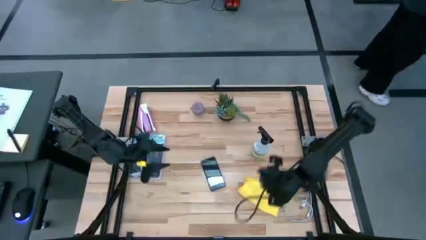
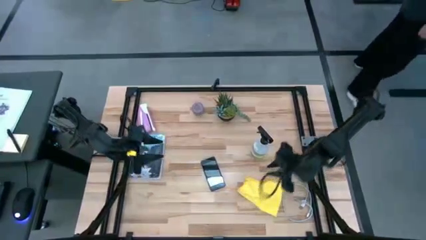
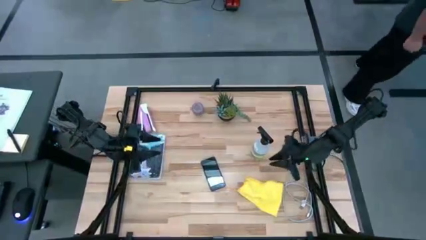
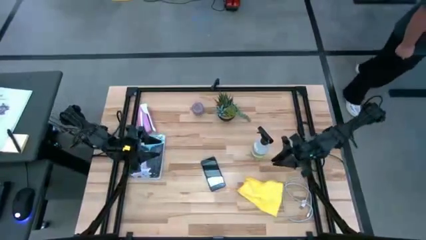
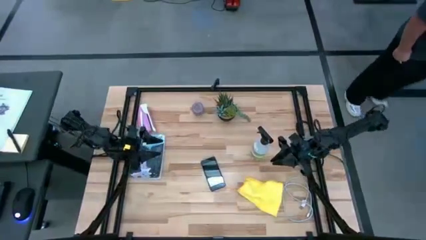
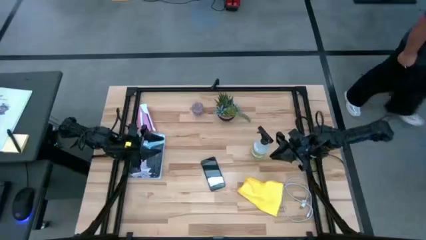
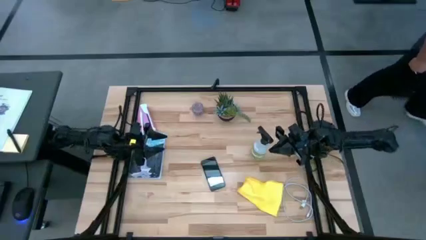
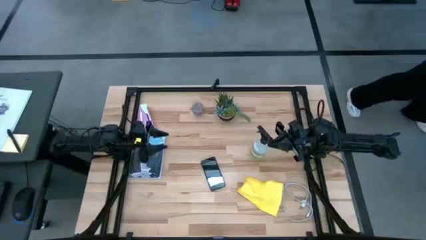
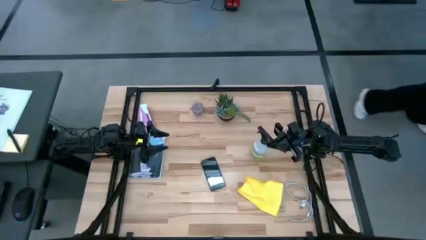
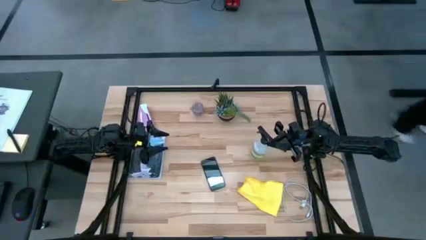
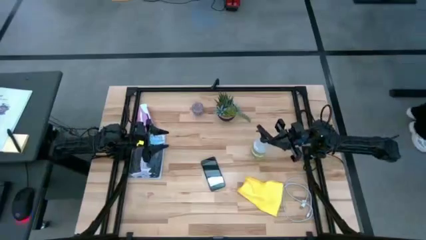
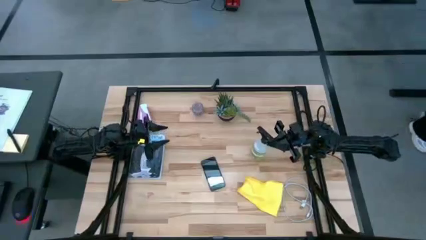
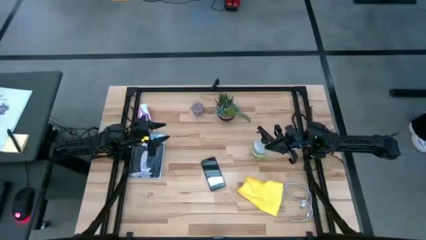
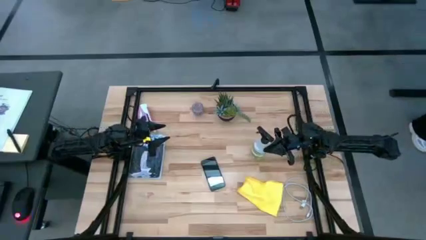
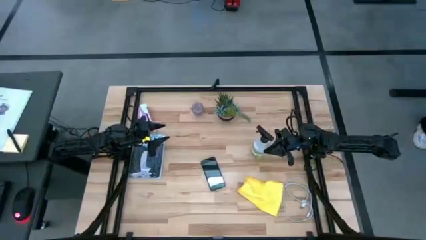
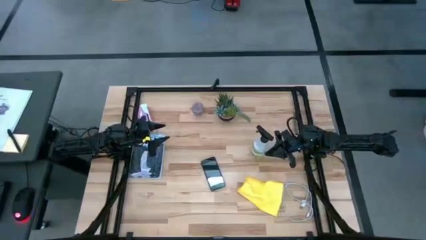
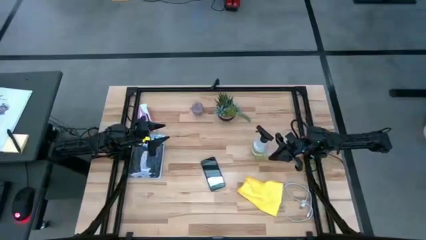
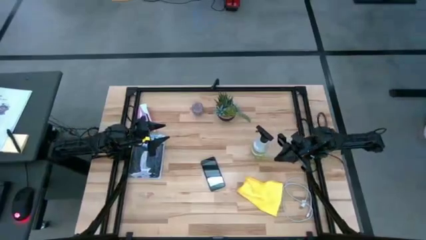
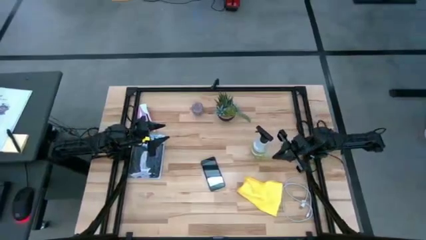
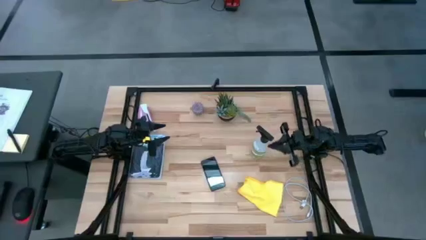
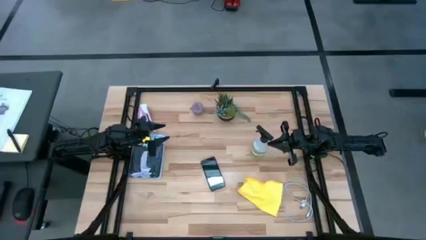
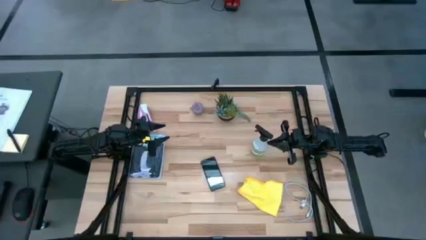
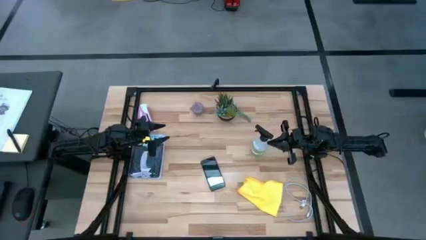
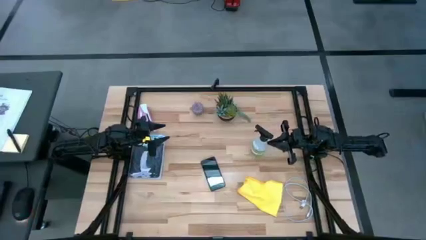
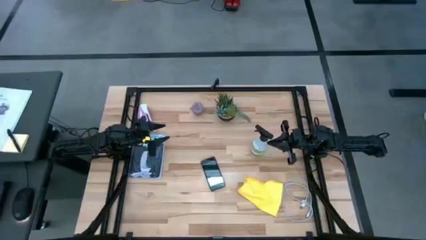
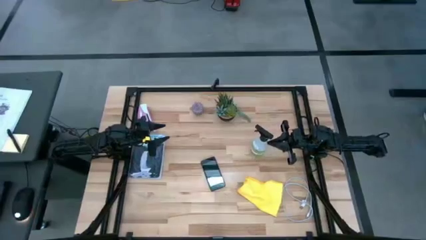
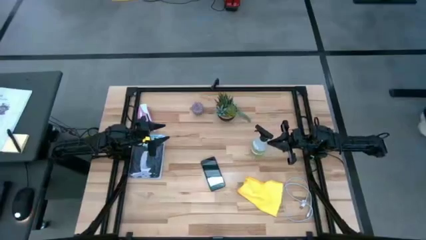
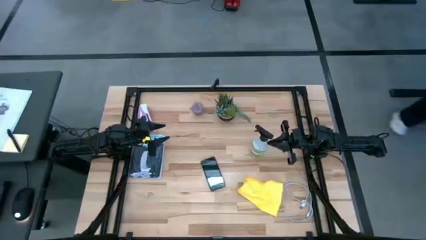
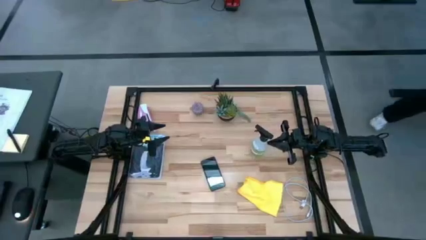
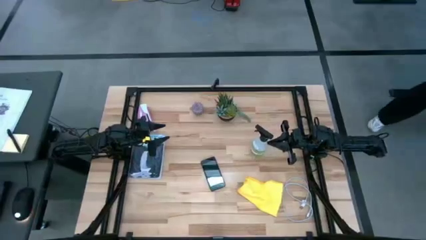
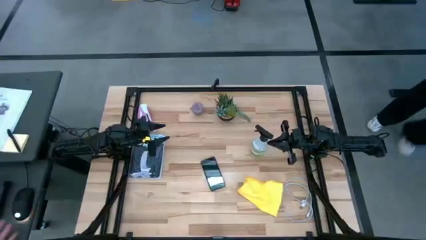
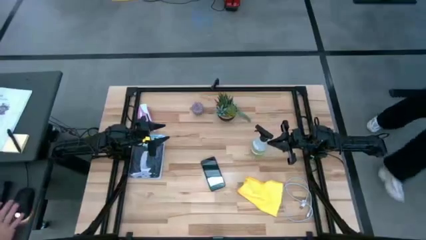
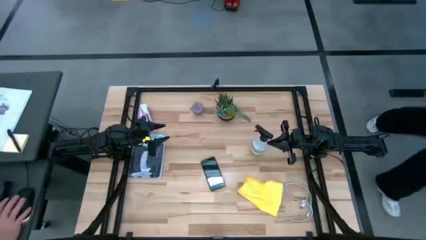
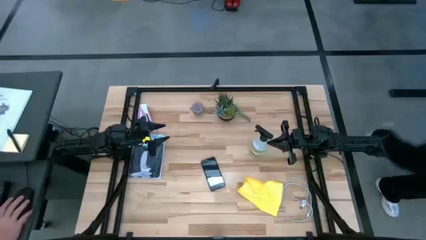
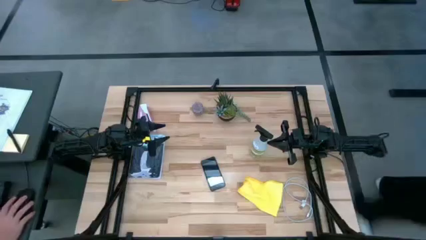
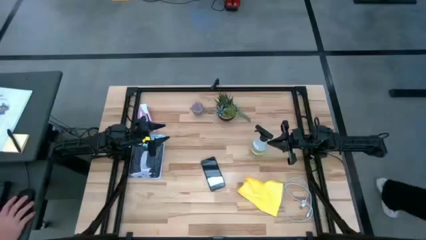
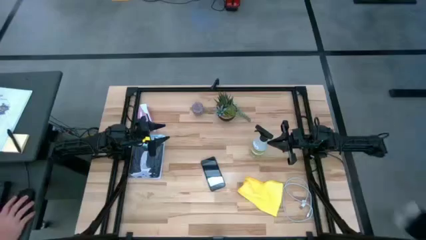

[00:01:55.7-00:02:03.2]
Task: Apply microfiber cloth
Return to home position

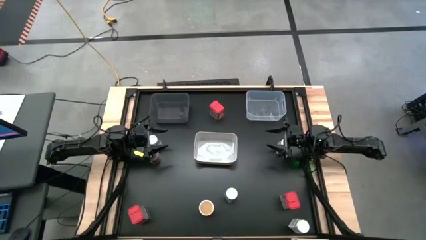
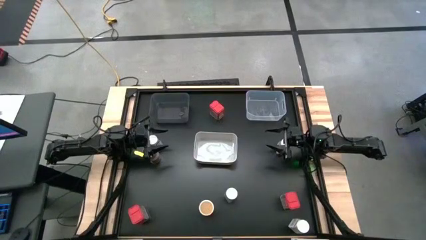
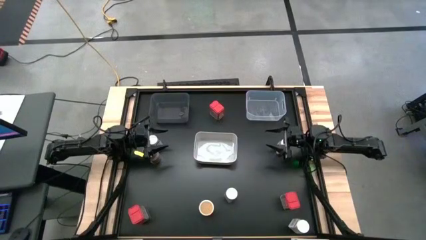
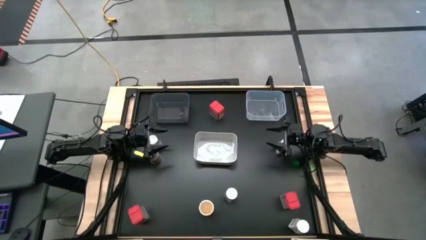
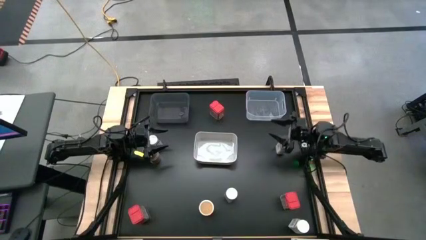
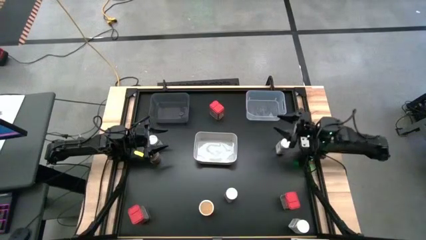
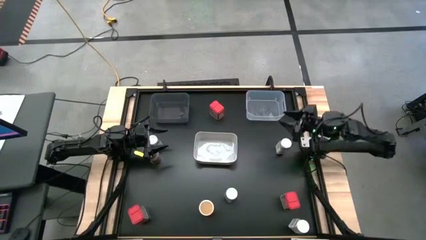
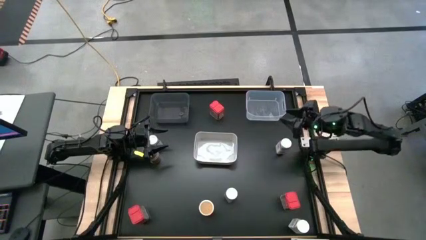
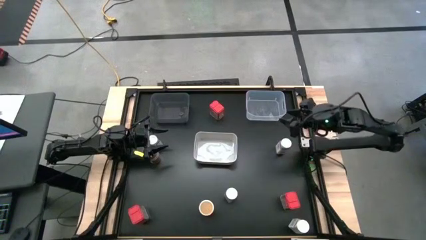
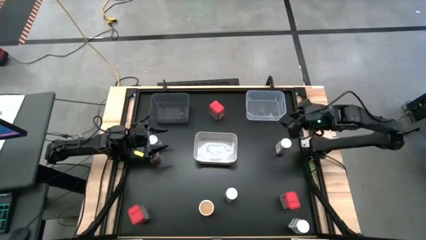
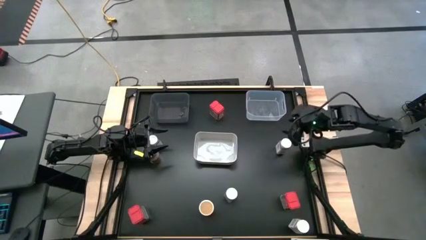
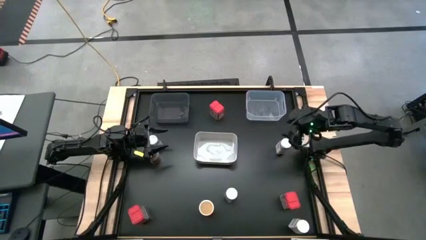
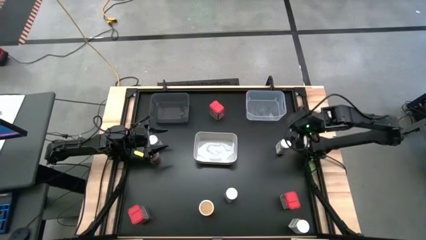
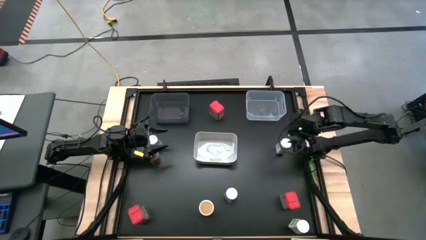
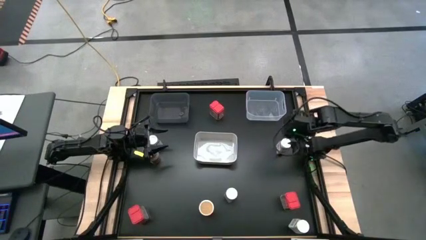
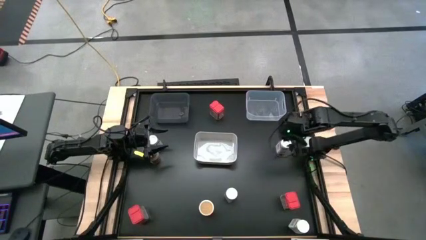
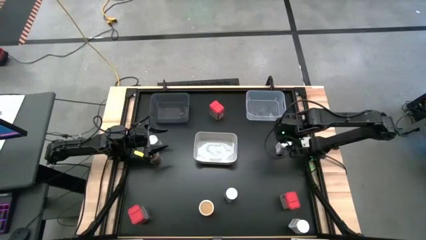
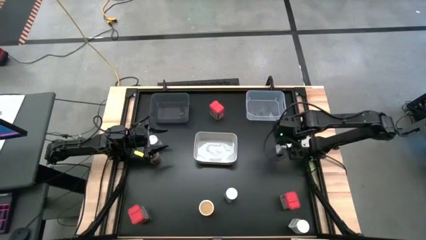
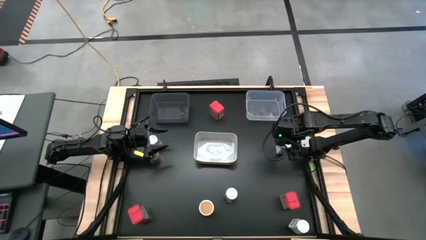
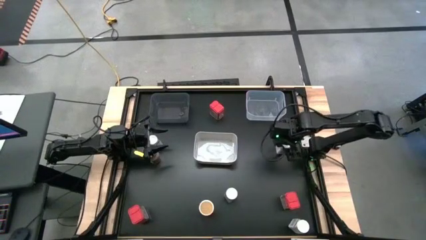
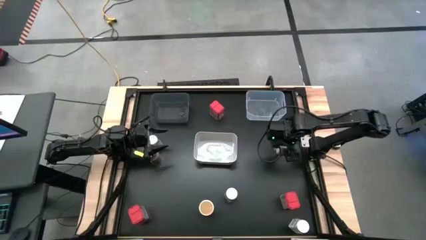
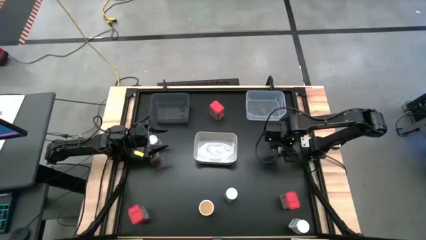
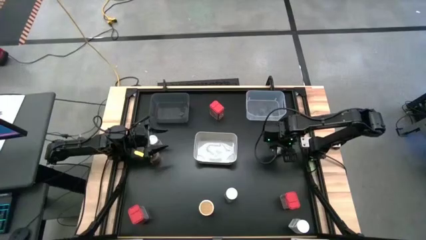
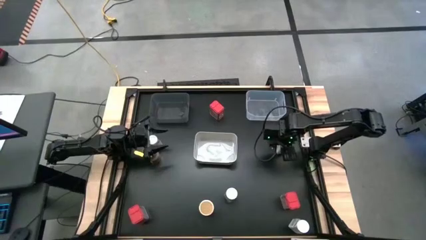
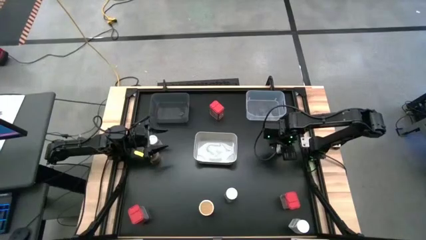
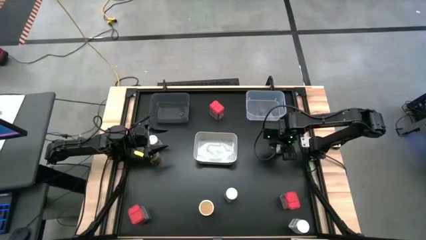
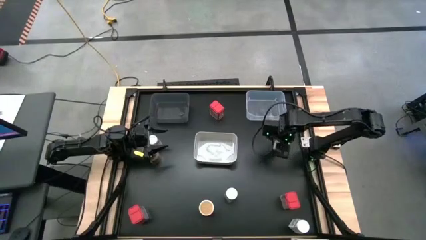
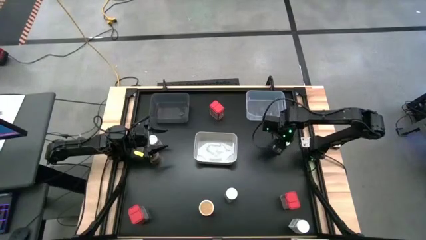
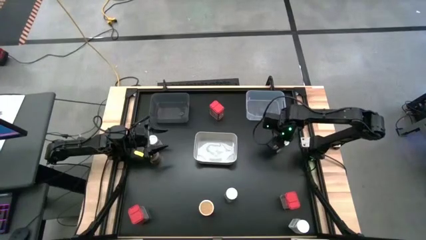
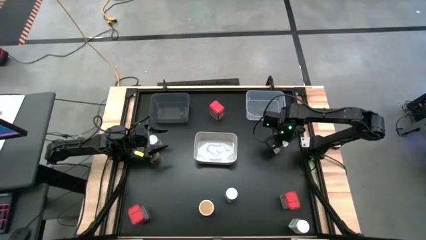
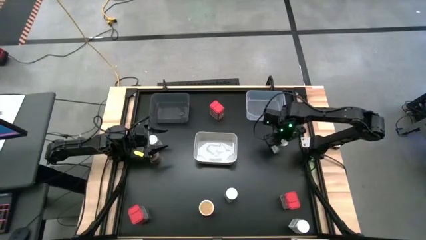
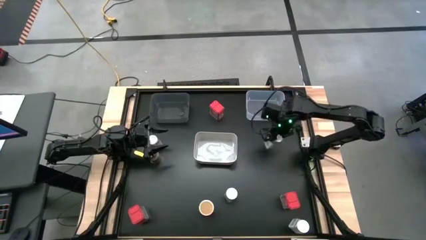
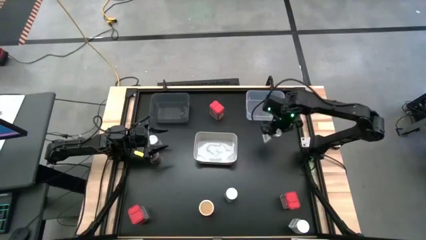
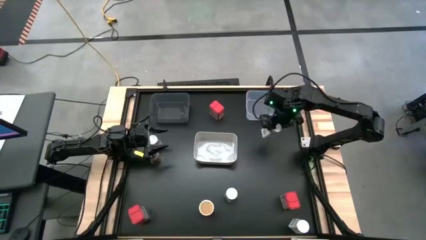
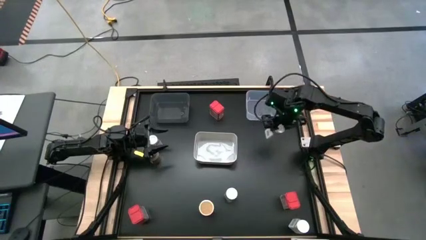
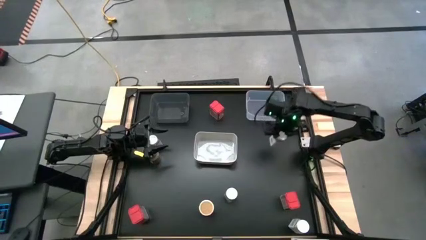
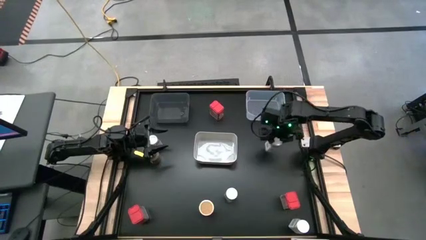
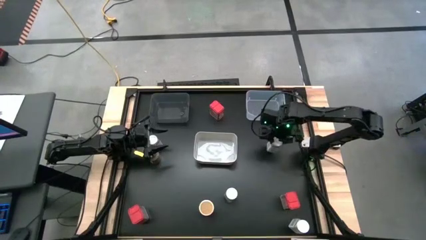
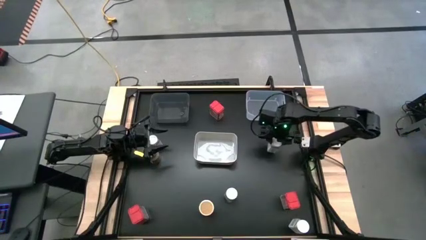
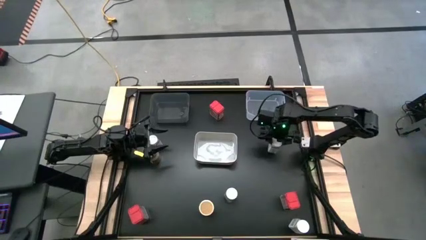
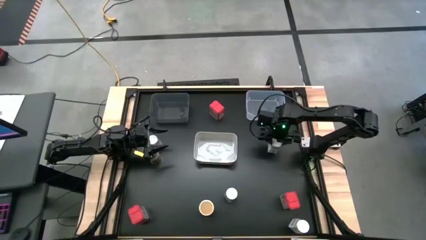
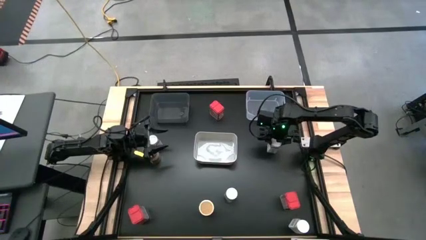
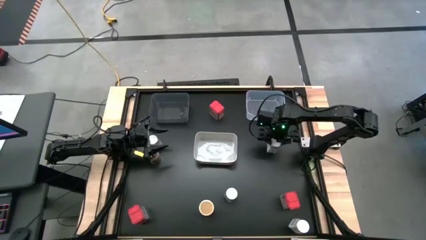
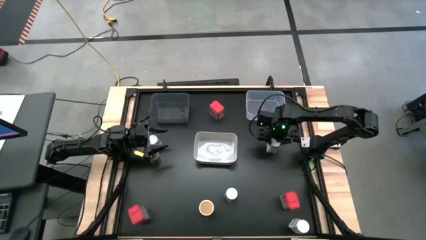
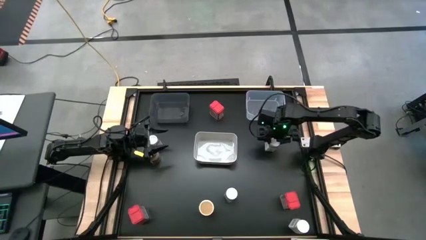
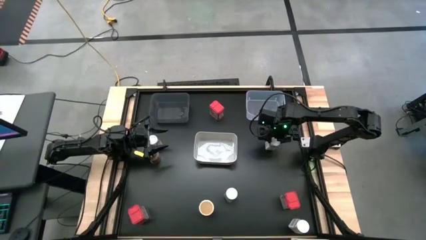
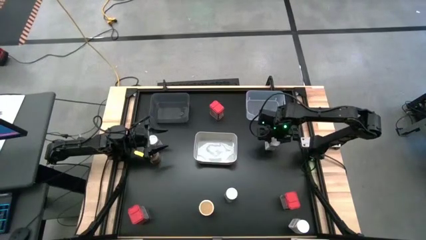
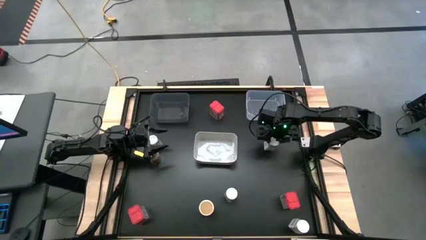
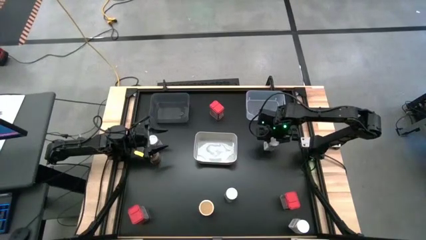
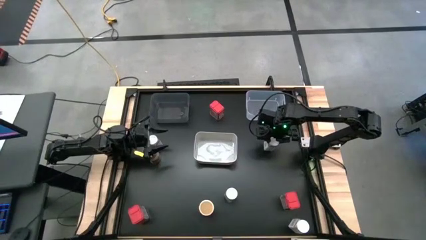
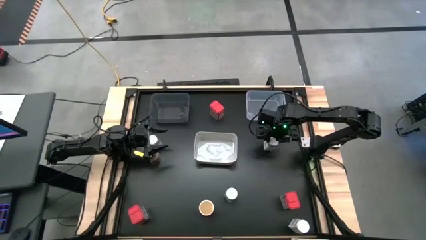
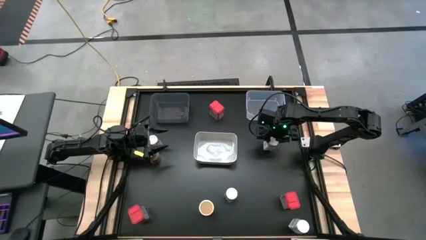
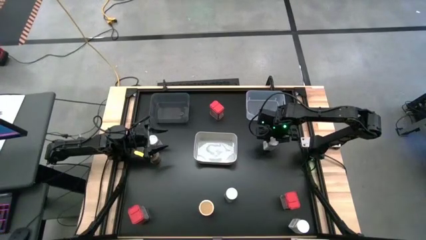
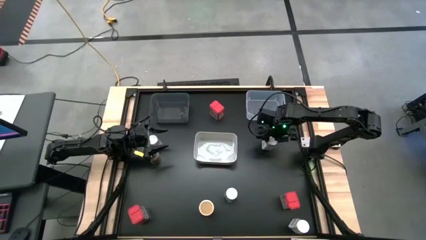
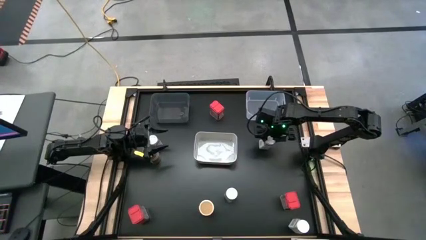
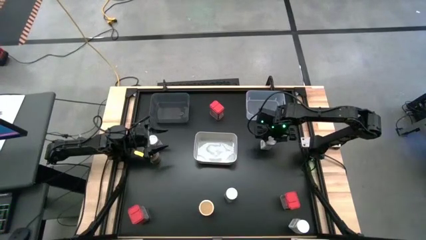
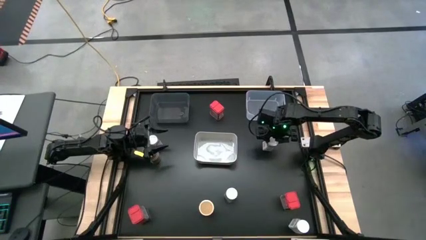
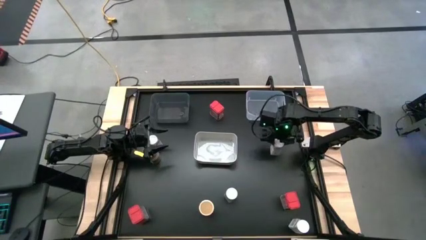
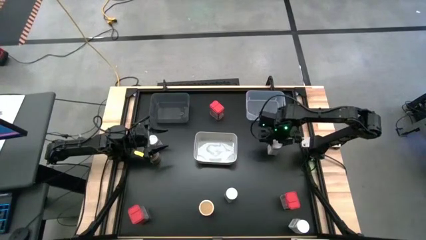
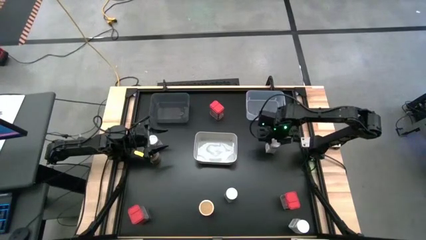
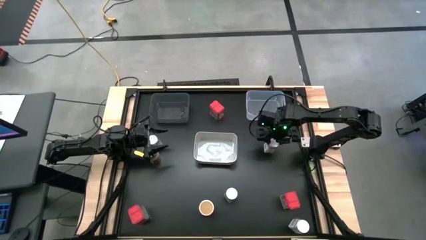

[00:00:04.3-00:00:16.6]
Task: Sort spices by type
Put the white seasoning bottle into the transparent bin
